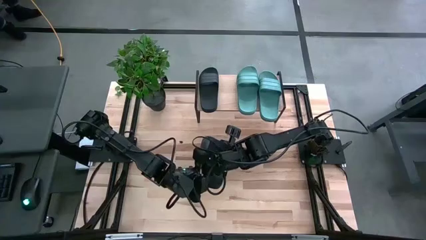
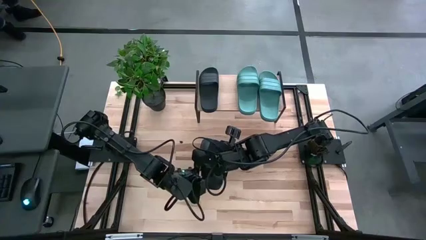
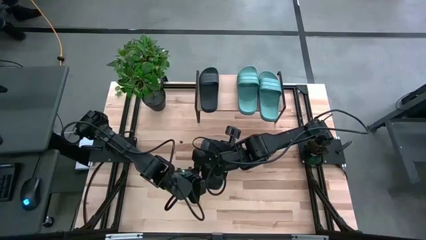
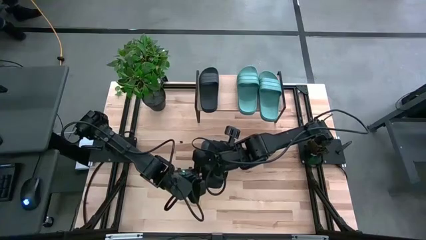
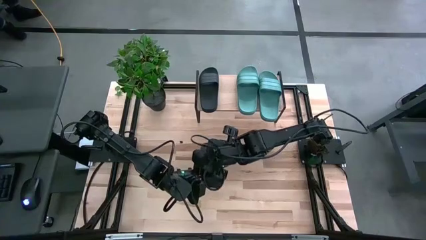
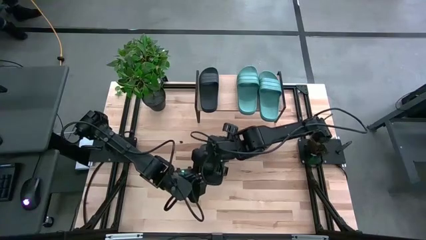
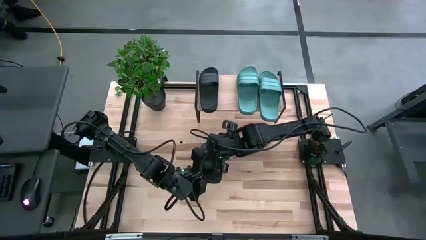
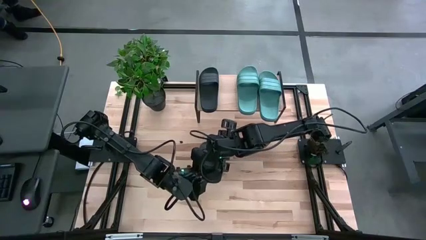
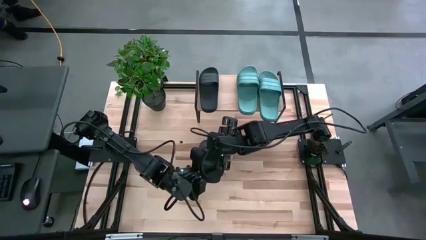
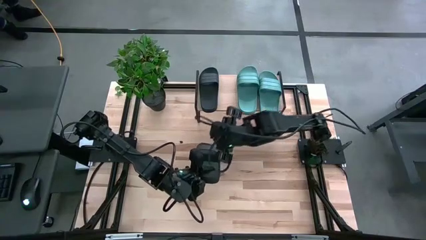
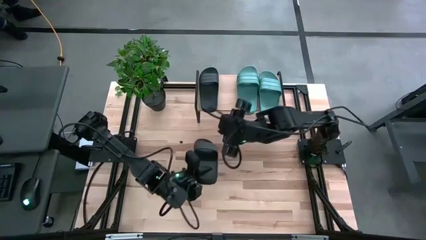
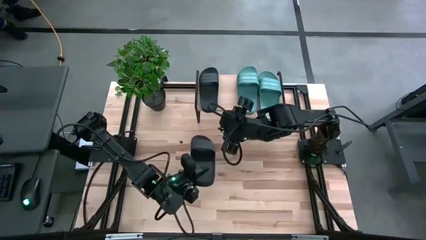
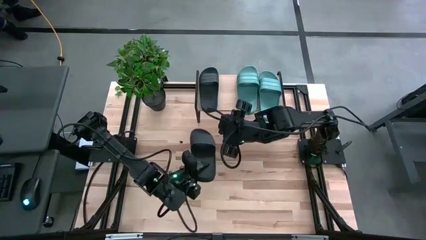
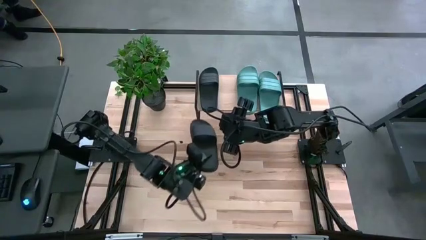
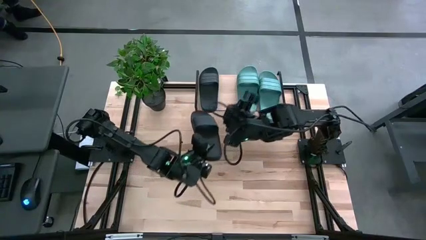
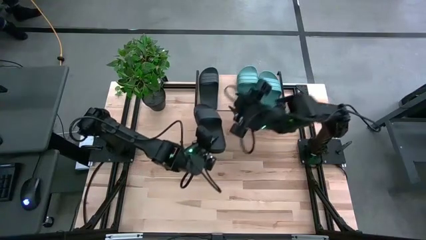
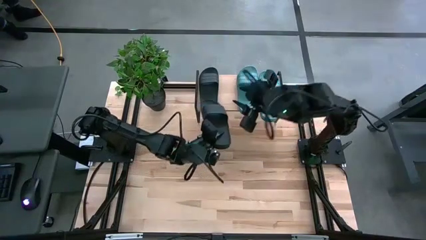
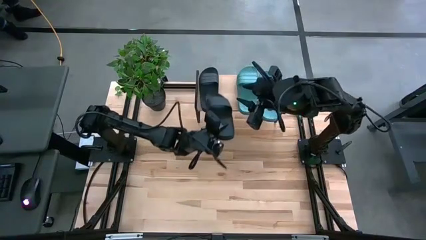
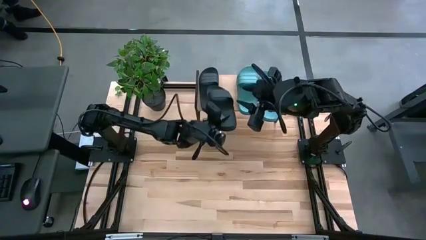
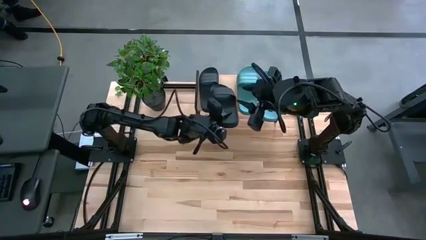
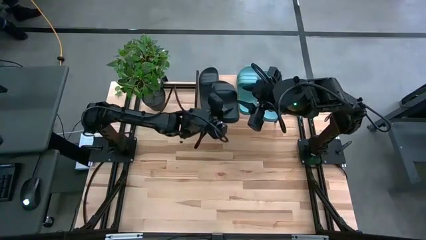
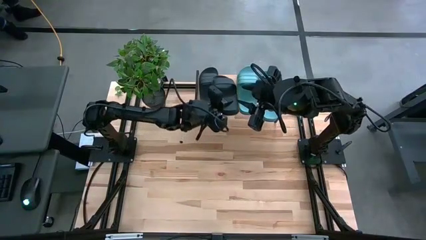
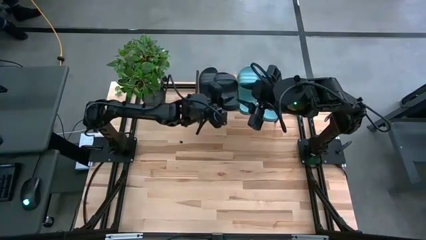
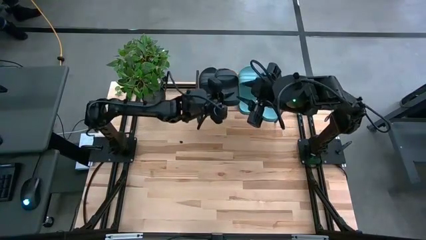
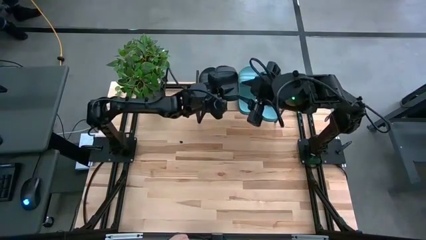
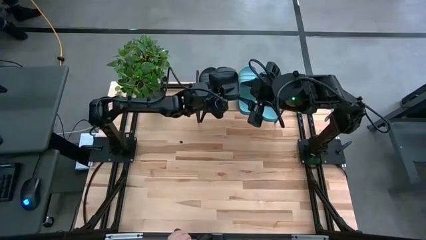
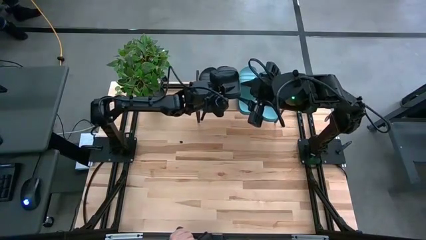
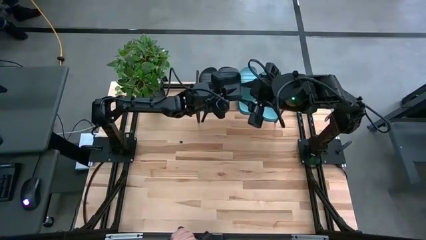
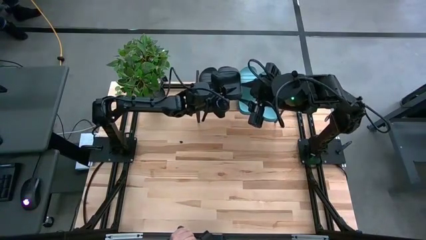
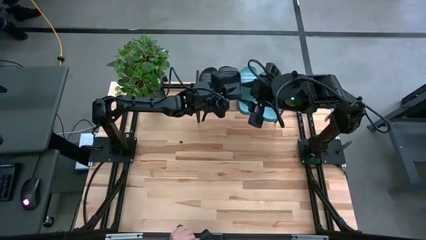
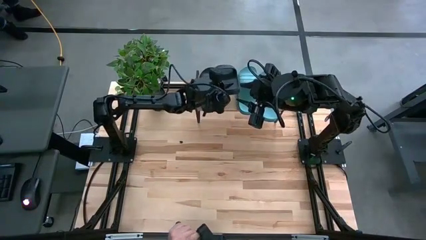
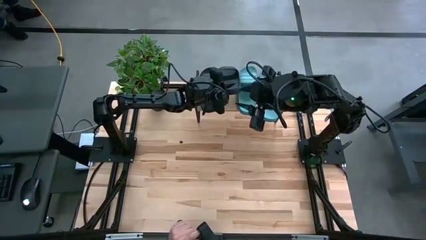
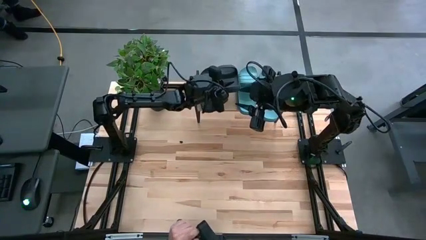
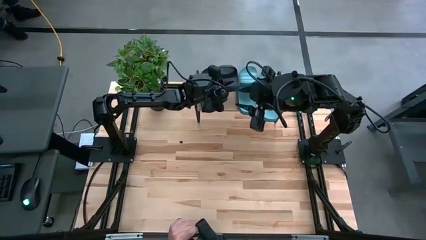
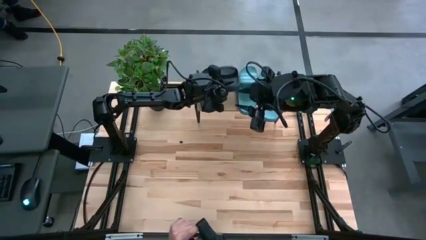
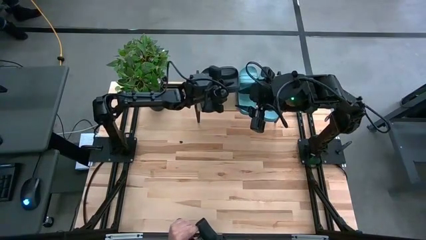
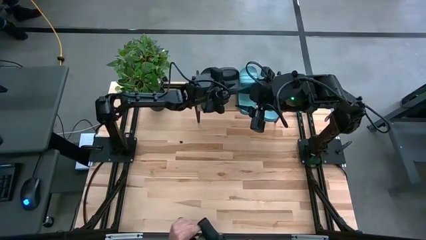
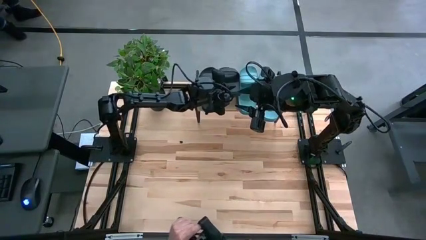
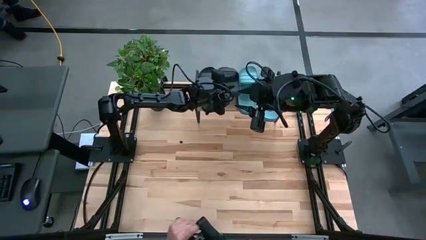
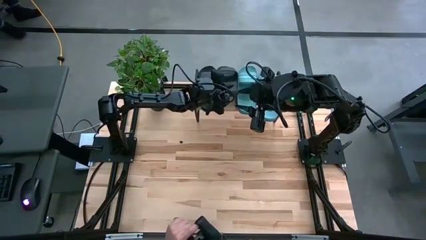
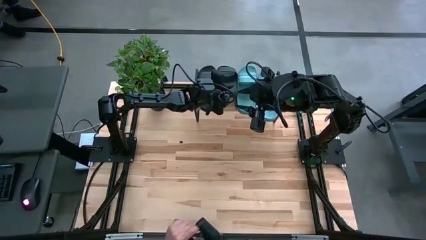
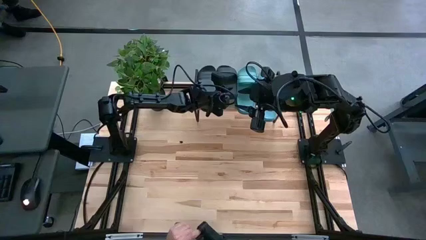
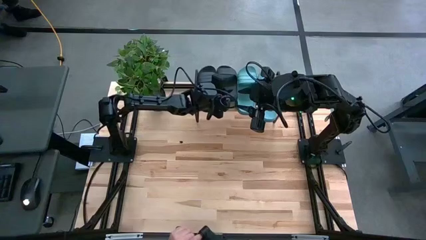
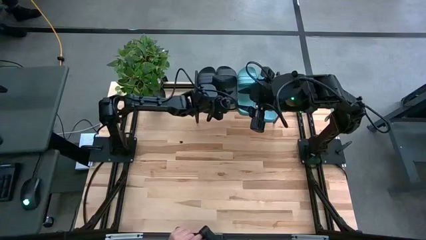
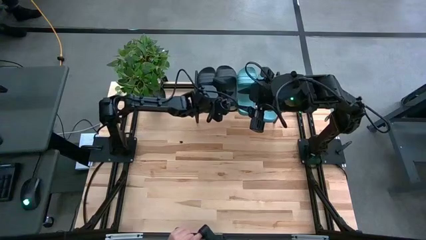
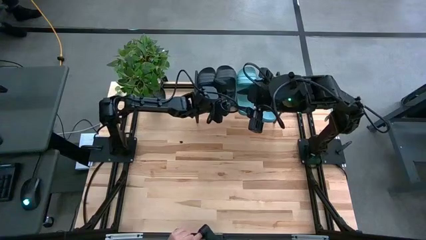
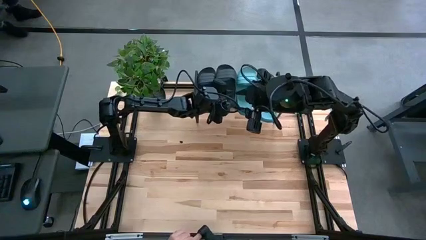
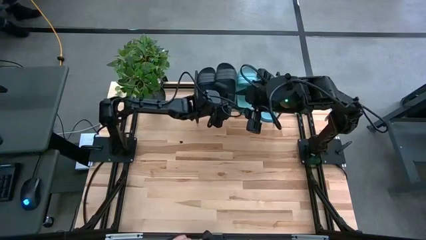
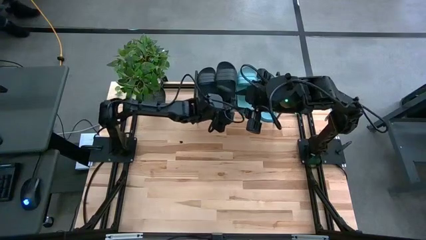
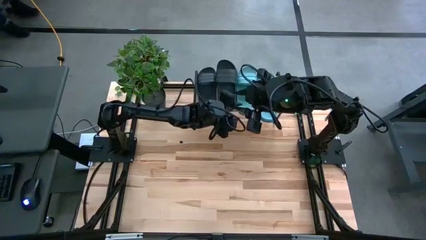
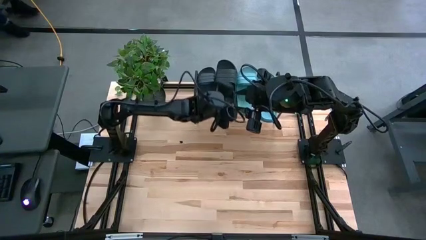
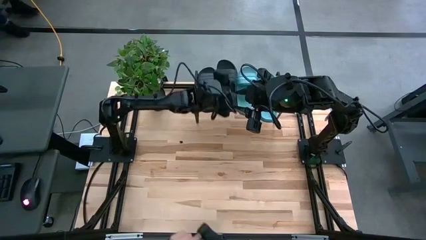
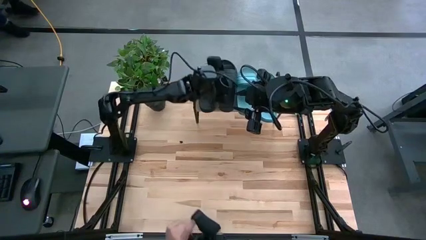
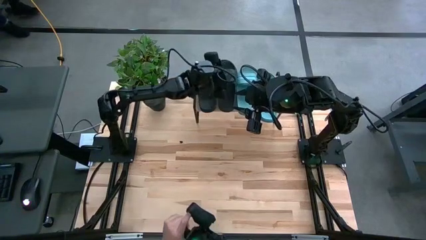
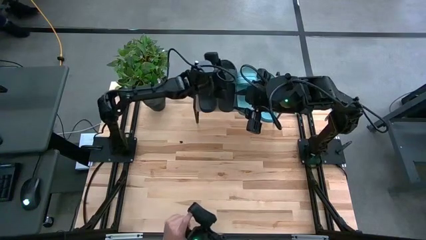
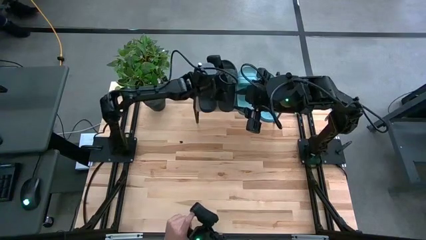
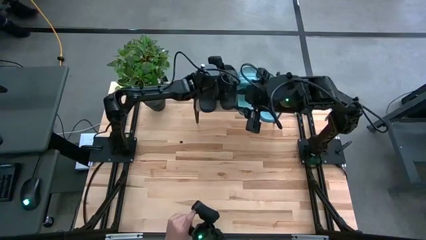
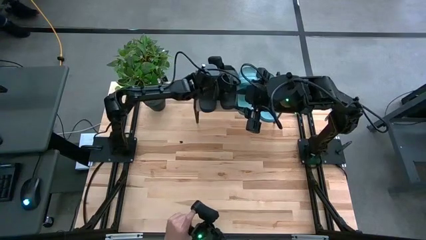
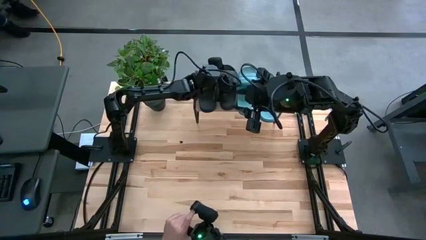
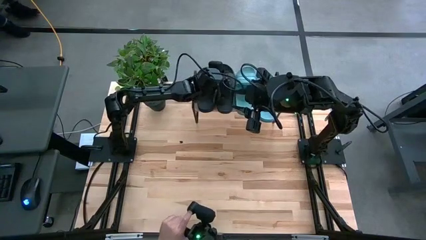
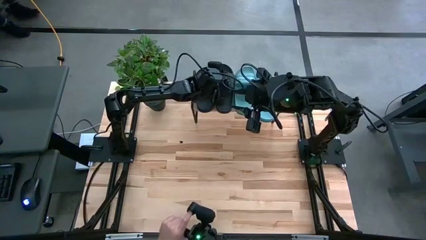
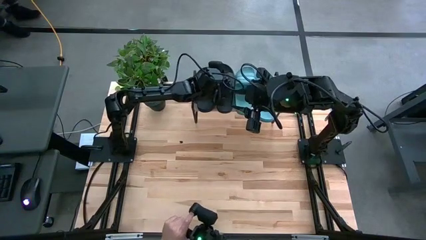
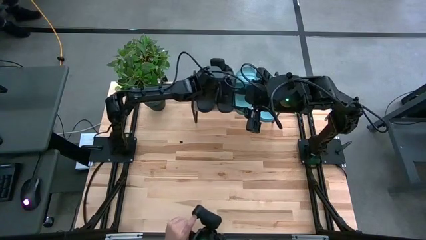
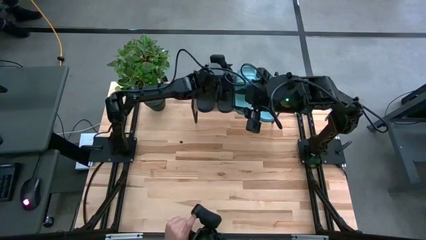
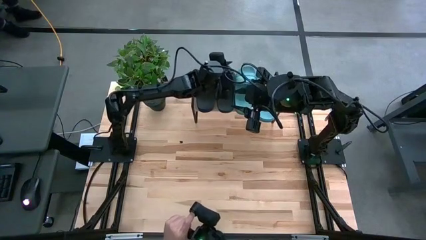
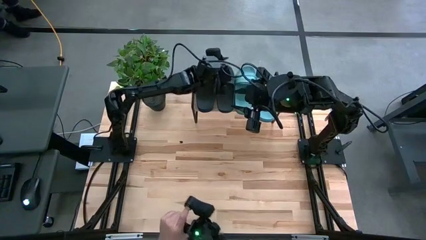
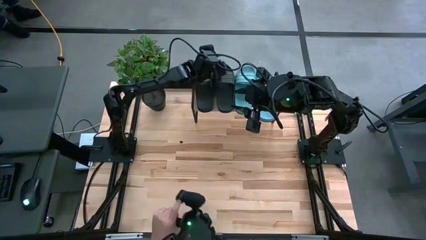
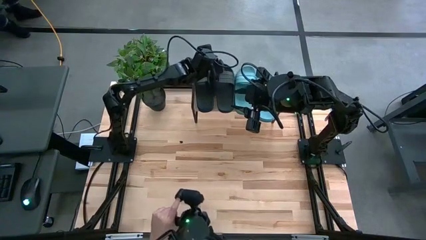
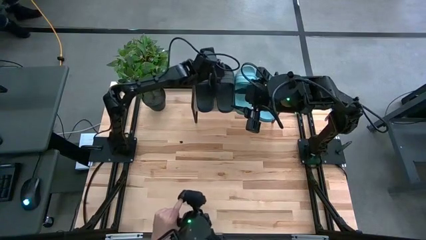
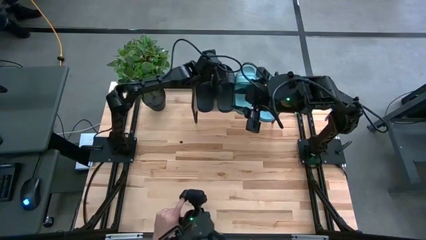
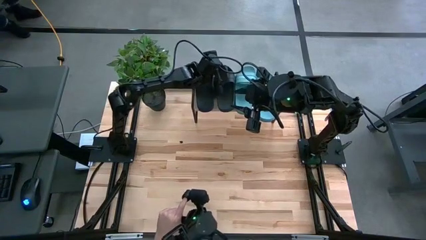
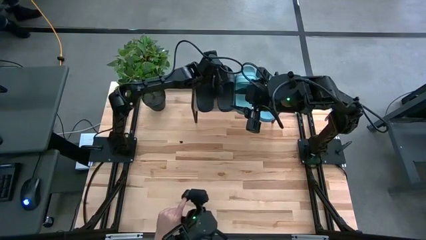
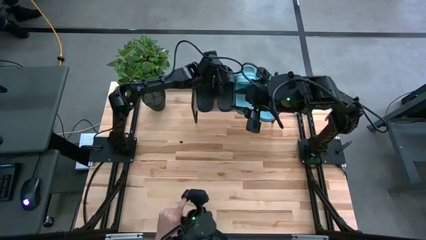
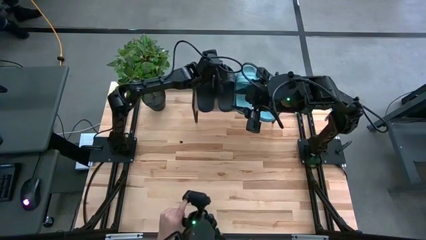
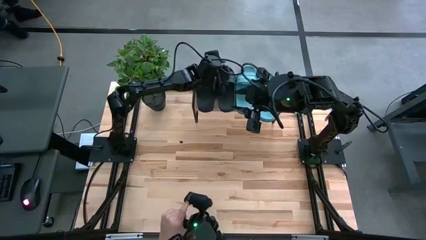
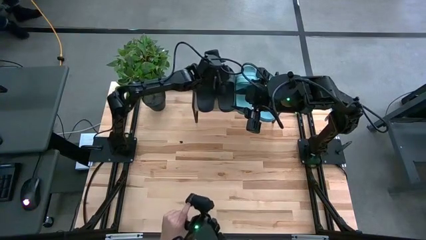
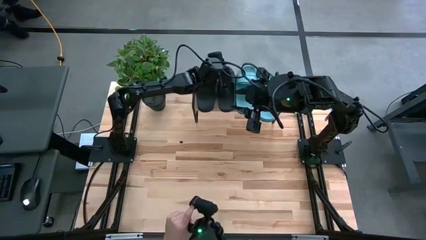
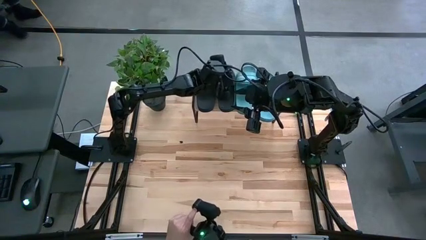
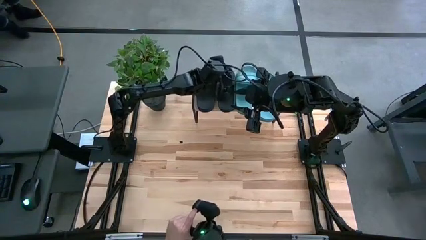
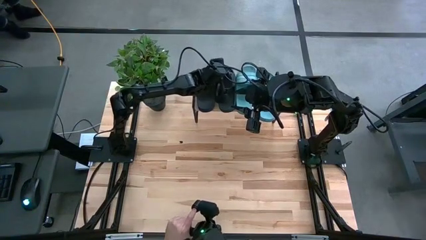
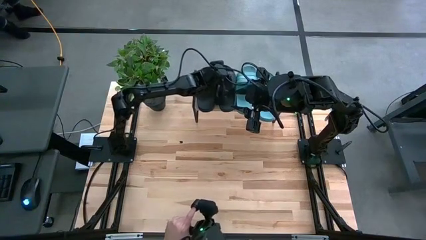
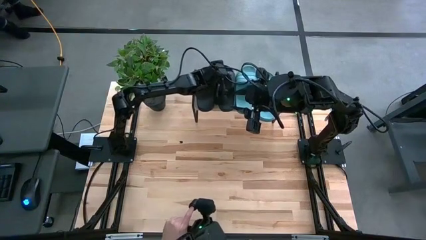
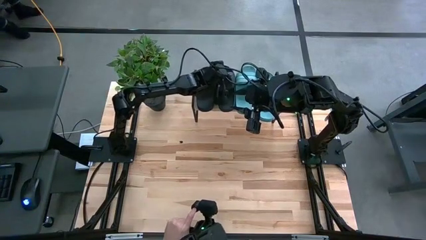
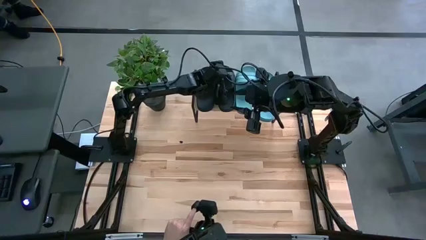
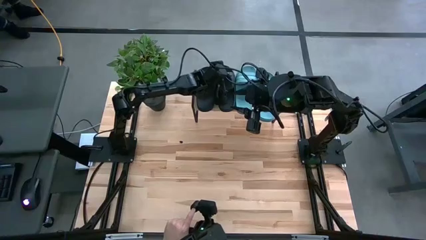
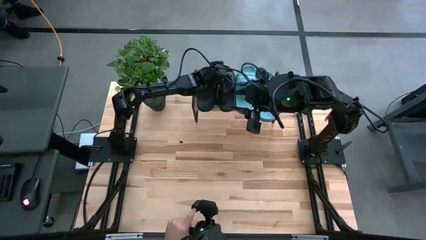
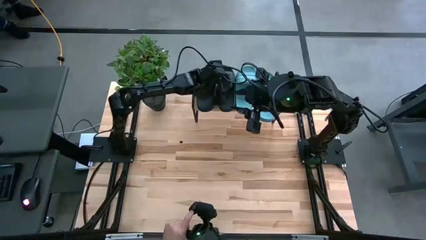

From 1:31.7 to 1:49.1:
Task: Pick and place slides into the shelf
Put the black slide on the shelf
